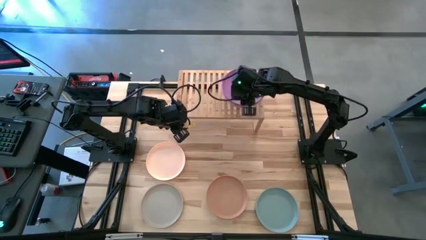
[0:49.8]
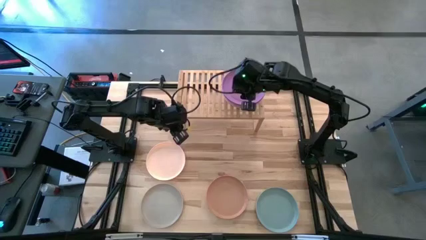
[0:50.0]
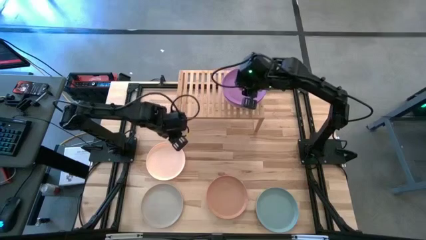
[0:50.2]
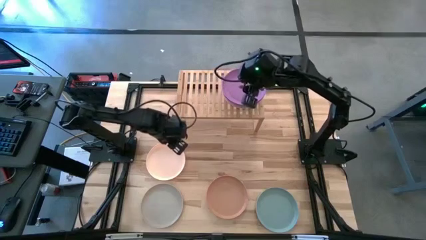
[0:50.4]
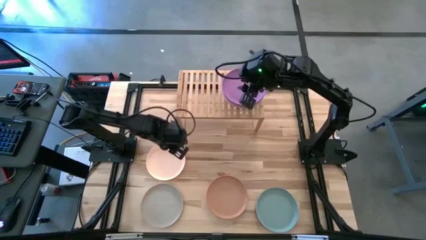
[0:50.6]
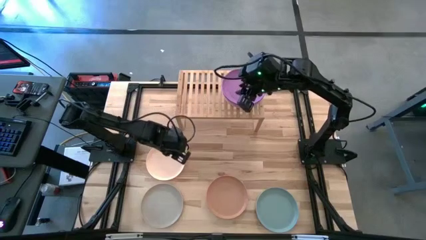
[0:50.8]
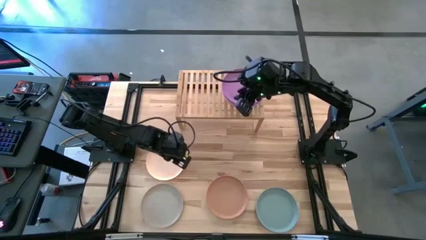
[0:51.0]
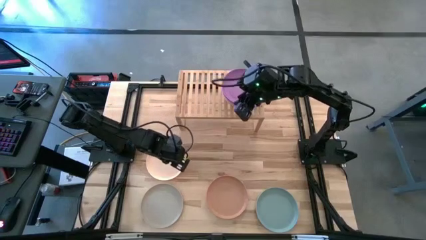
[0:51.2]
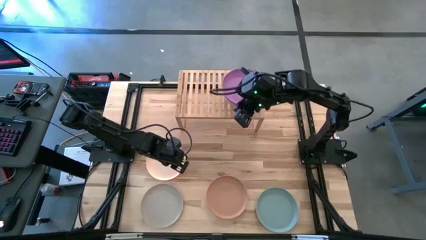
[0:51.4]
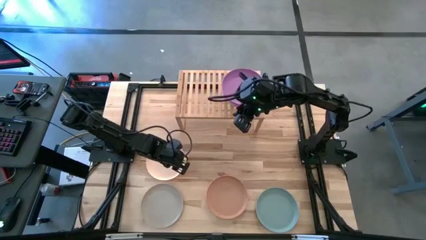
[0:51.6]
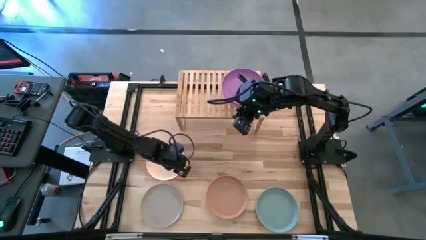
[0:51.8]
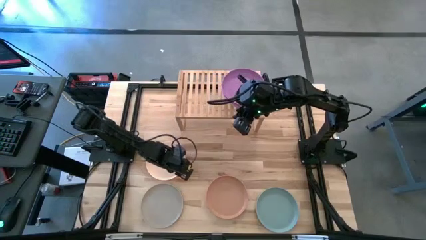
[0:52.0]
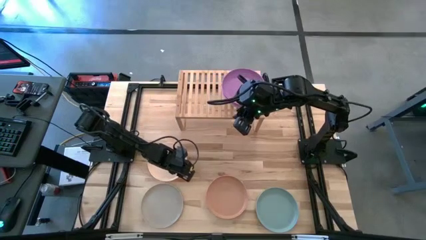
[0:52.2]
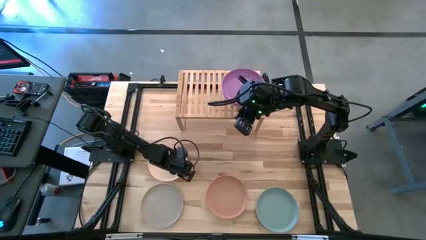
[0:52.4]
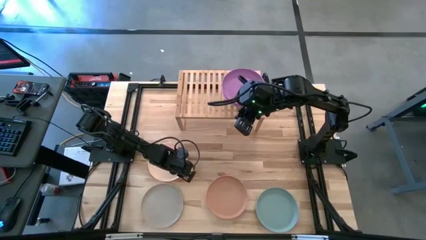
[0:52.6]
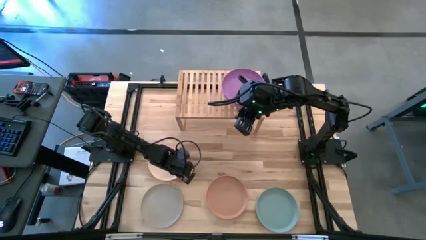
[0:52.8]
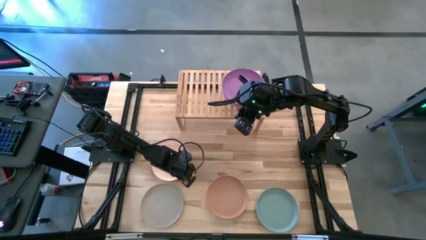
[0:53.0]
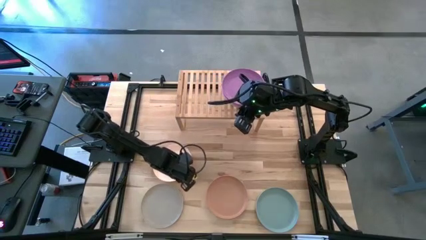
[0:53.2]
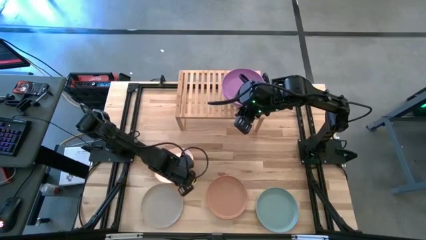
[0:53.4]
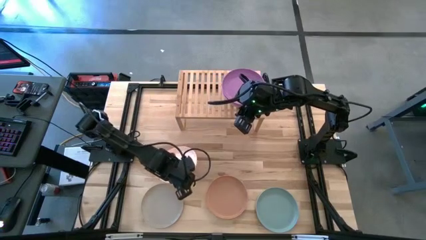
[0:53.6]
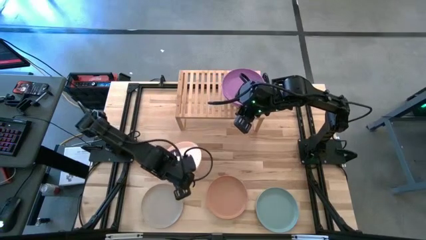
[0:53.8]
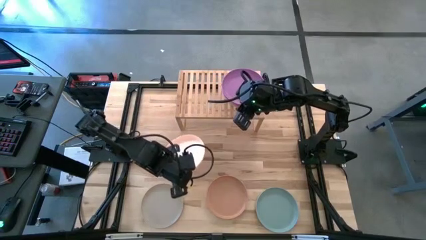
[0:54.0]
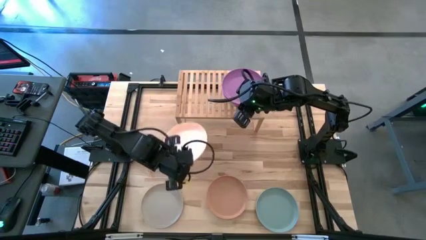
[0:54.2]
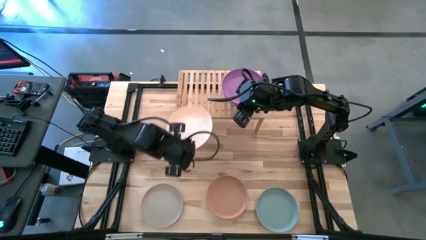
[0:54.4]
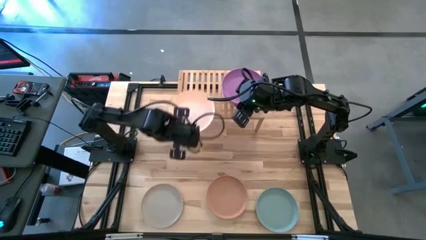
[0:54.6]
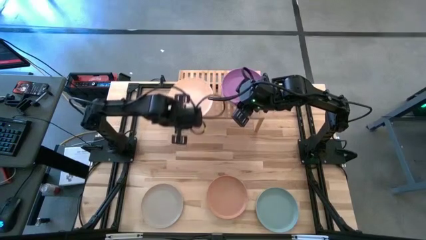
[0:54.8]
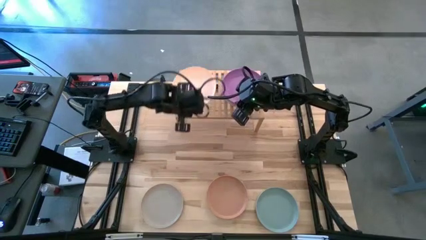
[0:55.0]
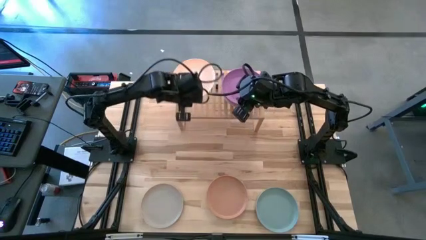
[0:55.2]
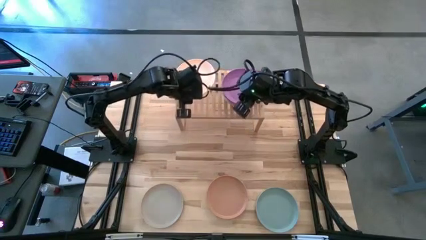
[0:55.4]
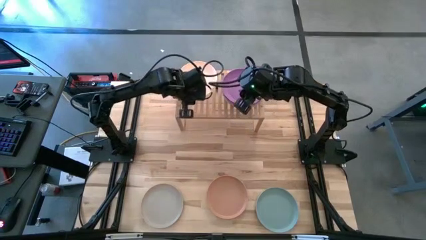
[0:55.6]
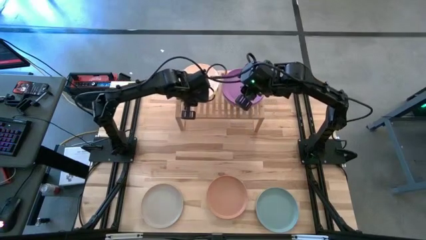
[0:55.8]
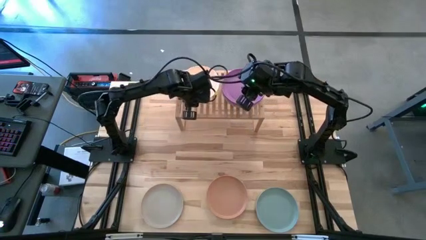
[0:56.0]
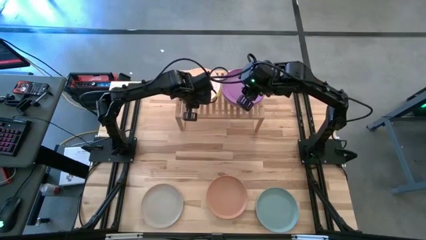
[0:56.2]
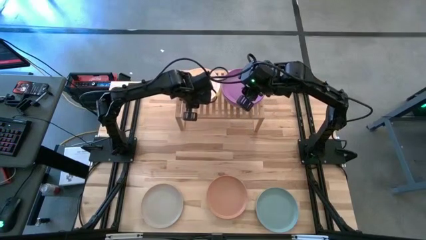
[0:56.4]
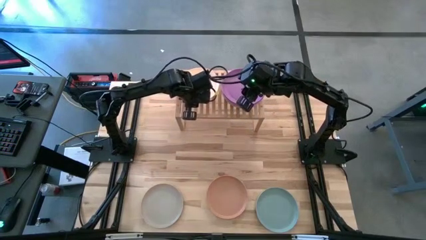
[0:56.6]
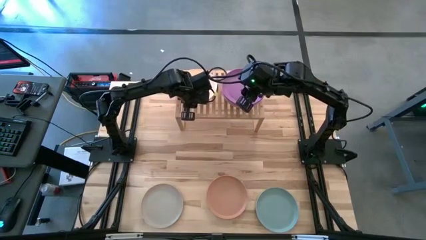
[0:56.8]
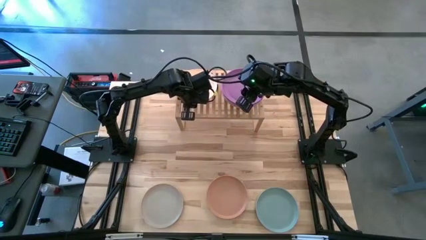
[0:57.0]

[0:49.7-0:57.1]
Task: Place and stack plates onto a shelf
Put the light pink plate on the shelf
